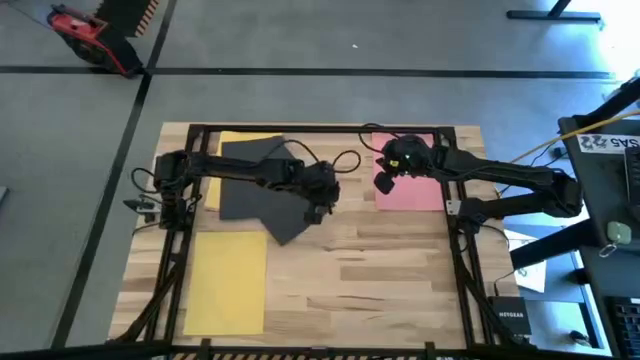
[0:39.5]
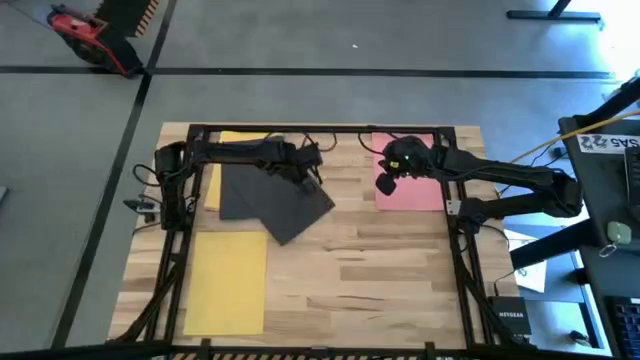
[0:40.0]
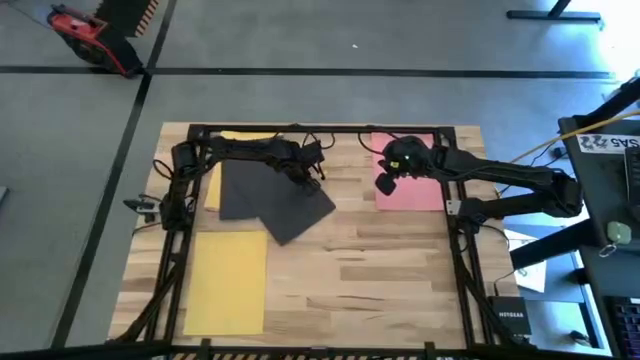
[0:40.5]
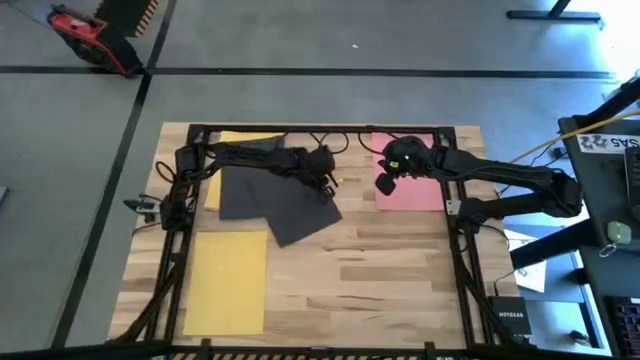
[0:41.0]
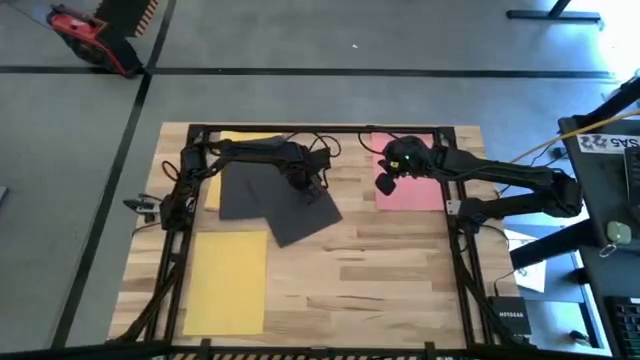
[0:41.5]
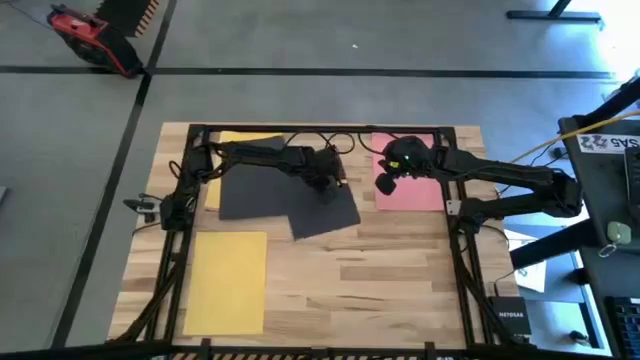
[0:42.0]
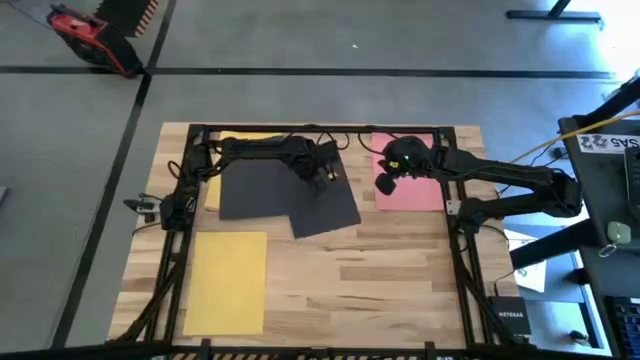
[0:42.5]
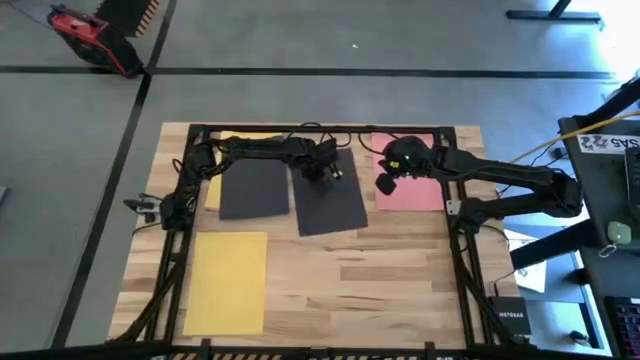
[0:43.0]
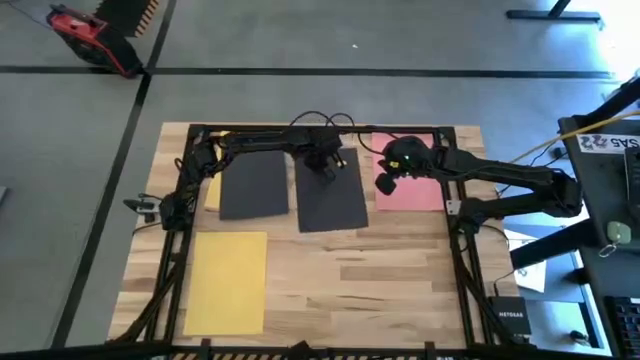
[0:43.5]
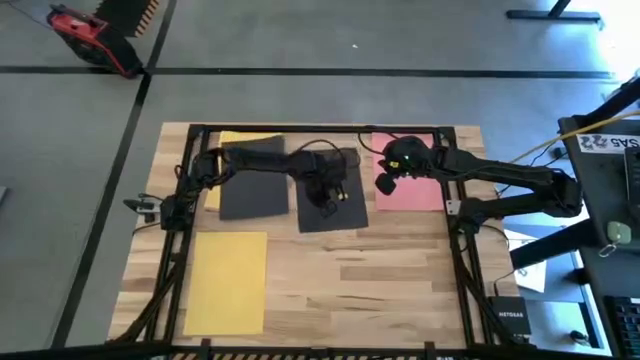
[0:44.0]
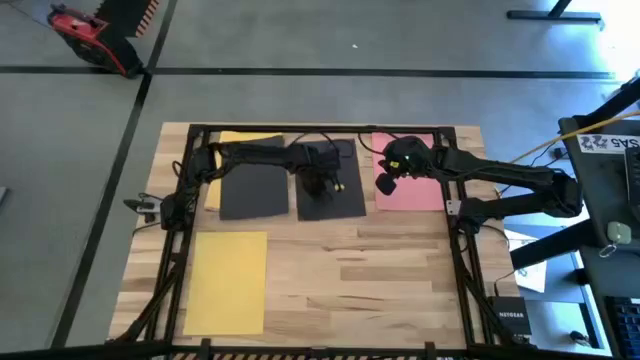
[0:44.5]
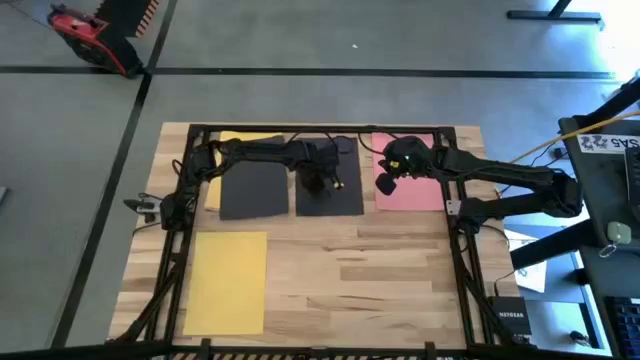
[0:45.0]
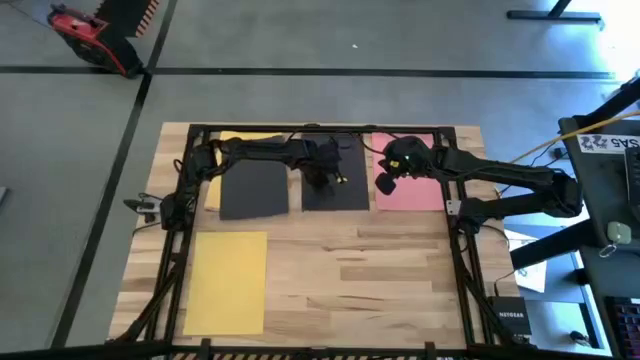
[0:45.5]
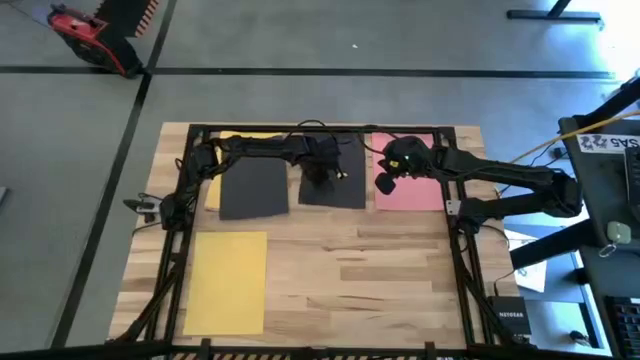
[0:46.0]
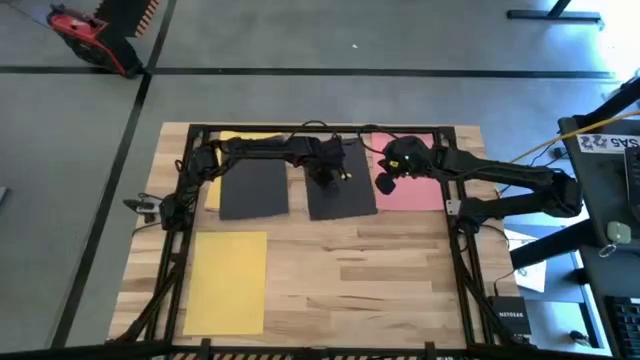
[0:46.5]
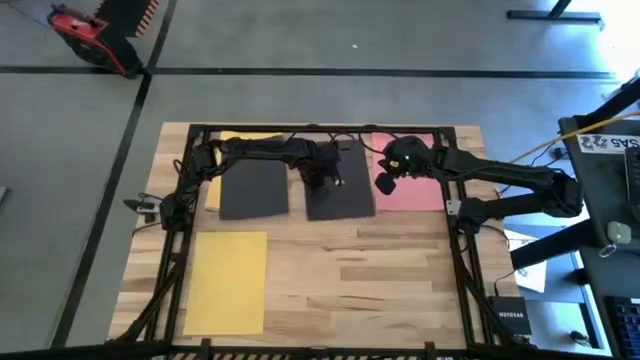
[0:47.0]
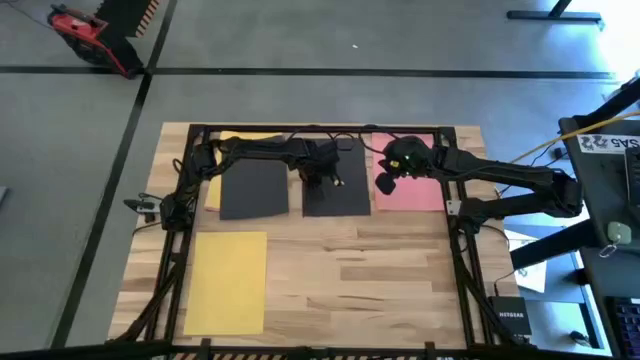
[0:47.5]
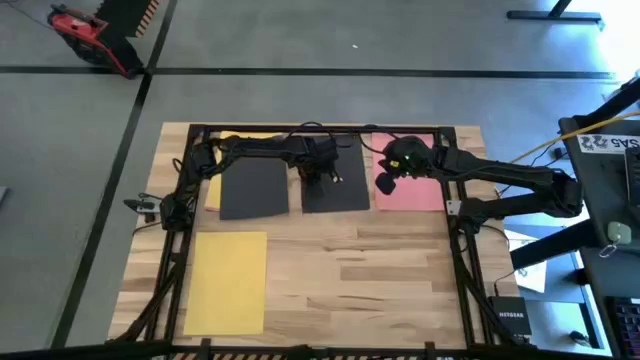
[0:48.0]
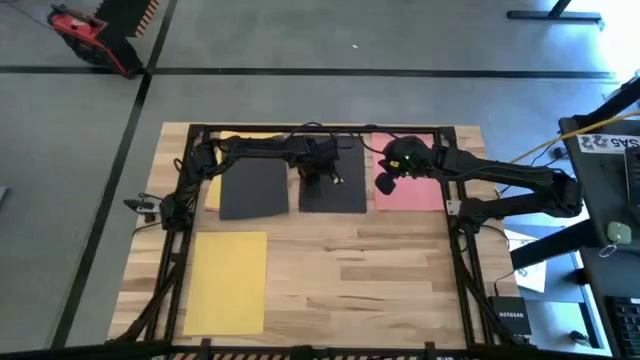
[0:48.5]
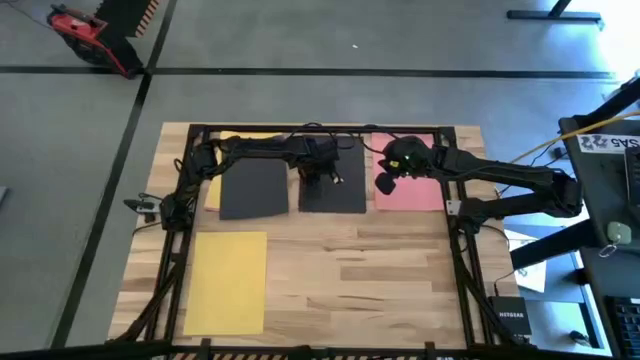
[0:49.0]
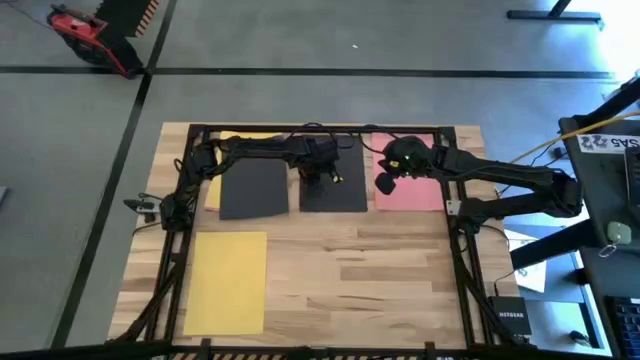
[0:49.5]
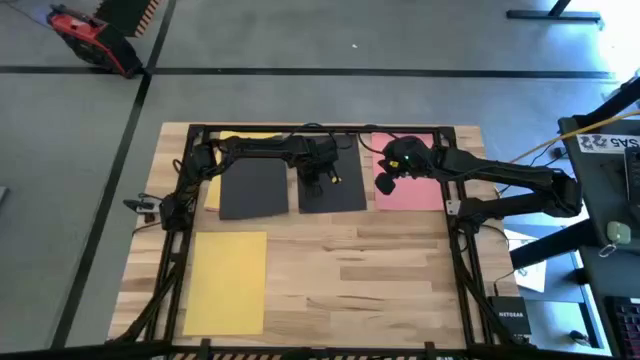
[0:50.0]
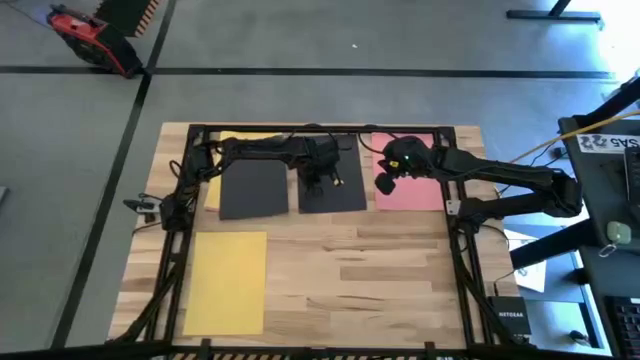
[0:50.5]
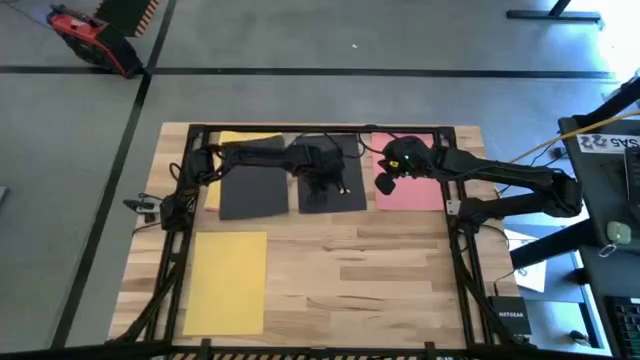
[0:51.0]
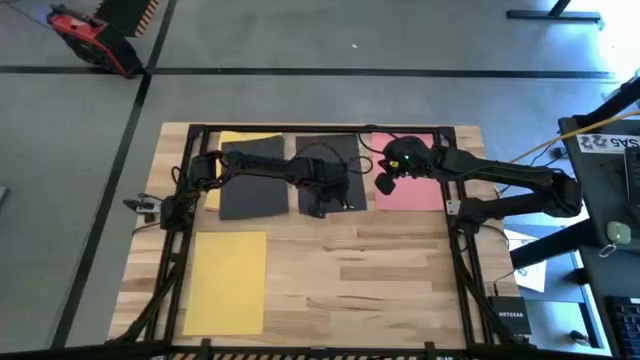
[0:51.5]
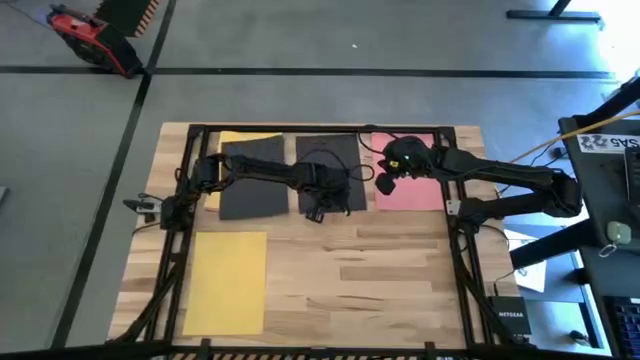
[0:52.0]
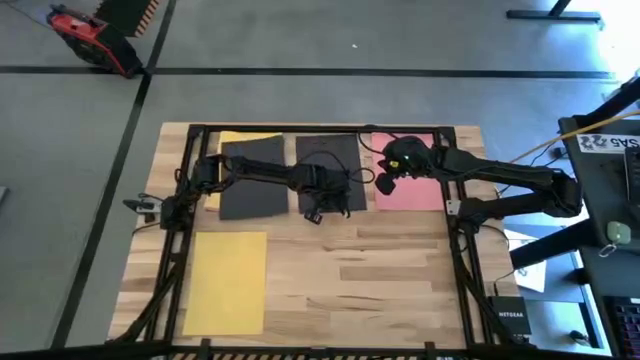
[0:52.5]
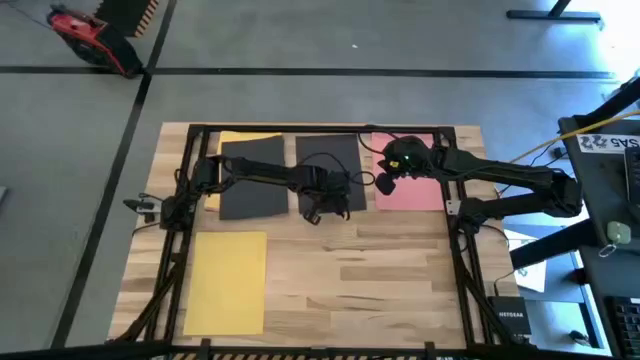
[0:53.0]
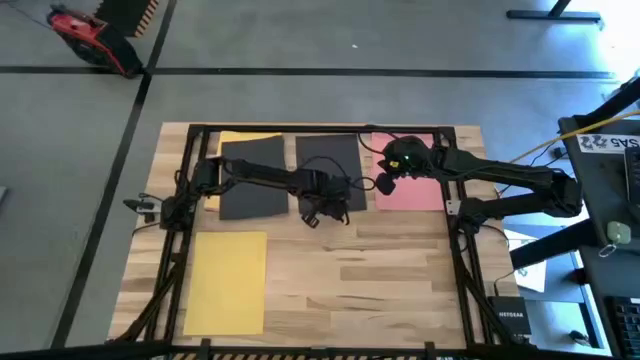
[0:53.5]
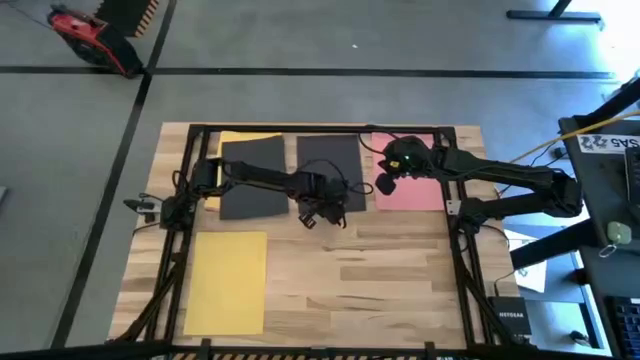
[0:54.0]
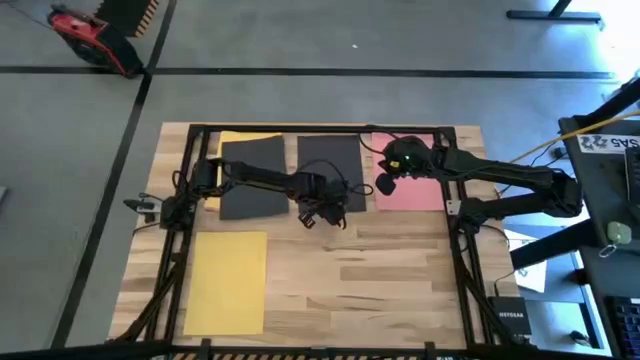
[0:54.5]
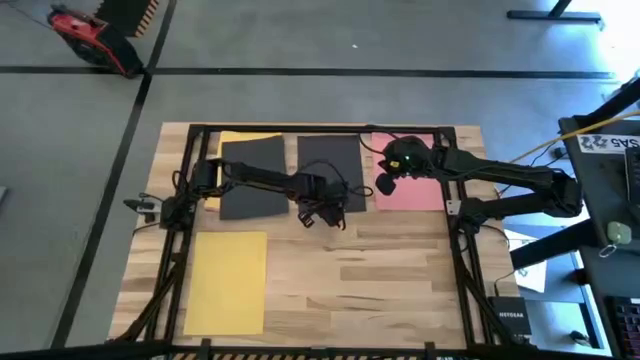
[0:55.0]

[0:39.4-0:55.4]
Task: Organize paper
Move the black paper to the top center of the table

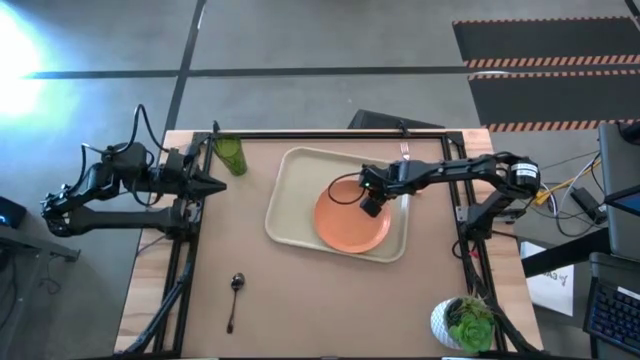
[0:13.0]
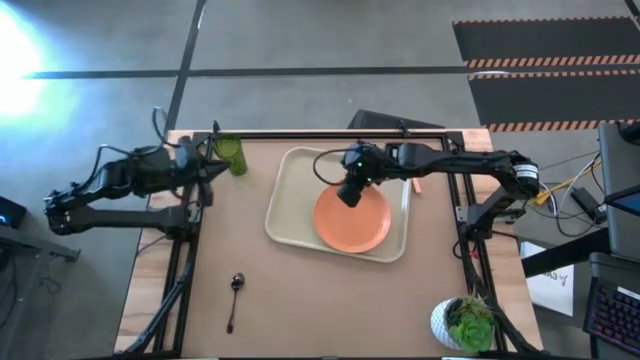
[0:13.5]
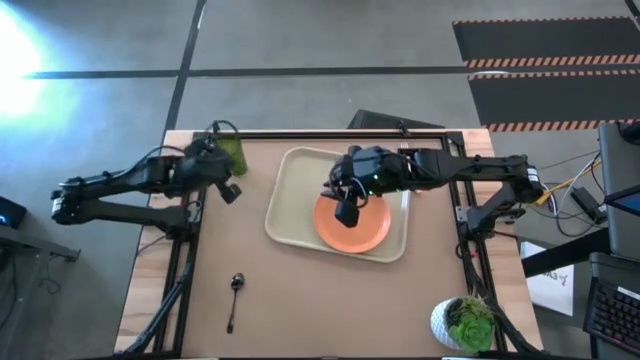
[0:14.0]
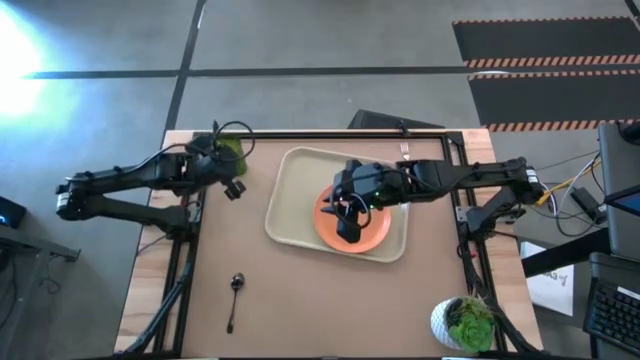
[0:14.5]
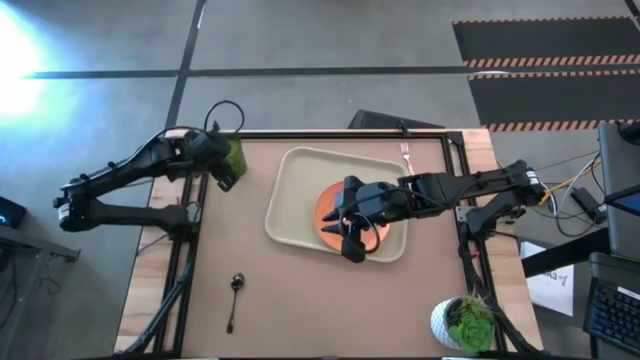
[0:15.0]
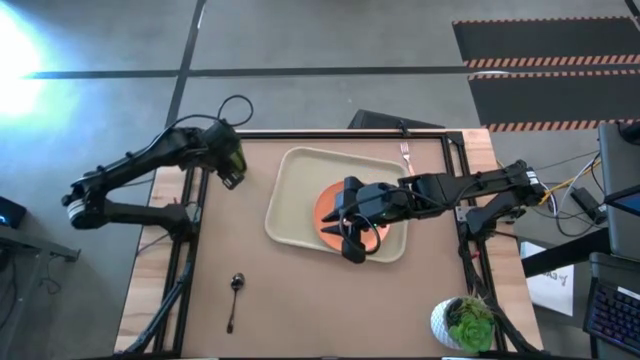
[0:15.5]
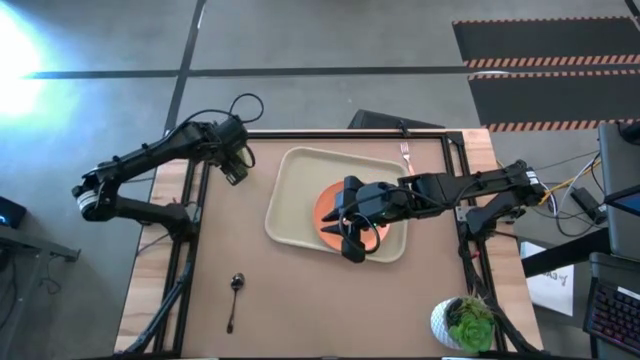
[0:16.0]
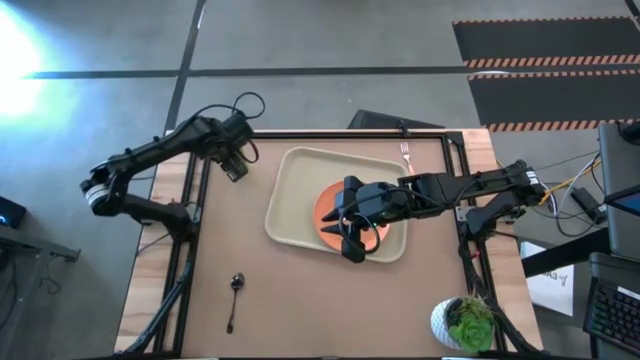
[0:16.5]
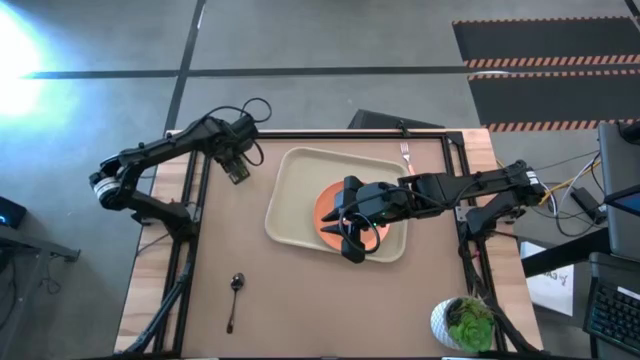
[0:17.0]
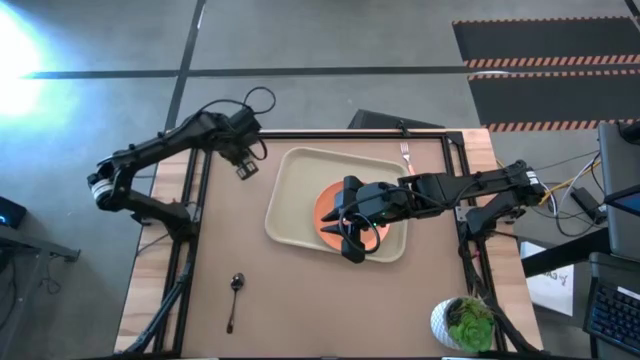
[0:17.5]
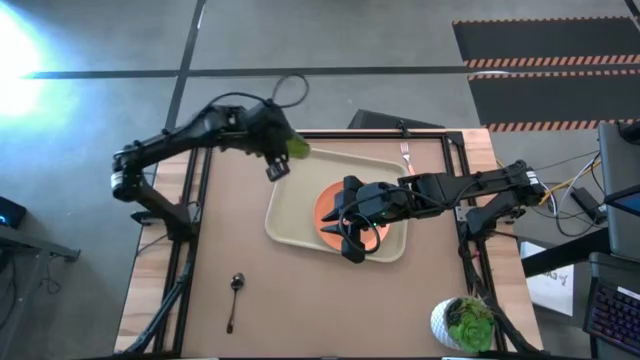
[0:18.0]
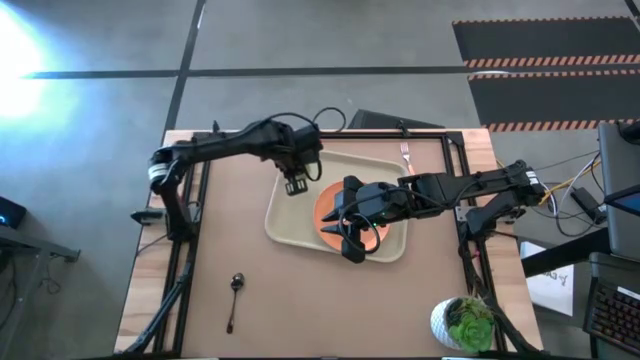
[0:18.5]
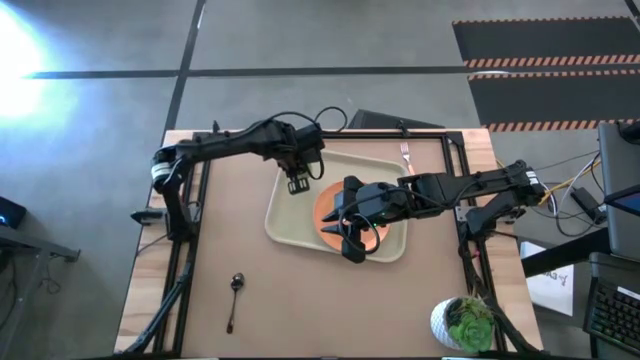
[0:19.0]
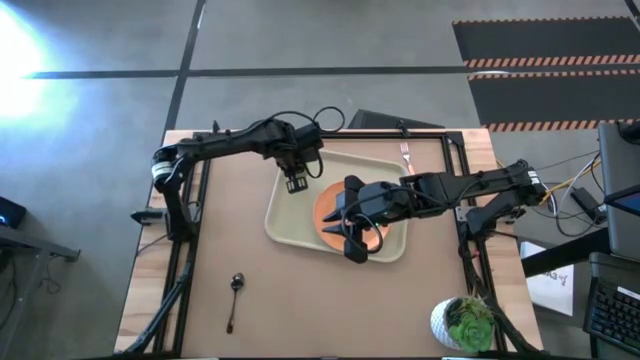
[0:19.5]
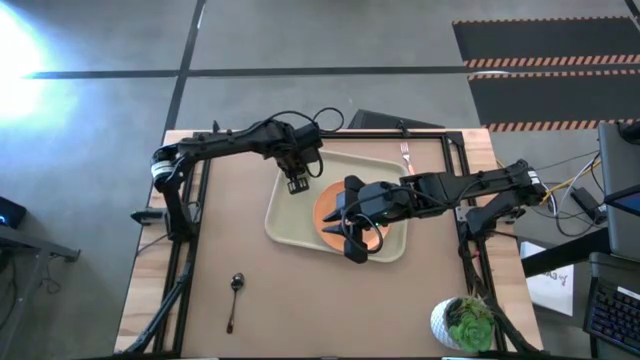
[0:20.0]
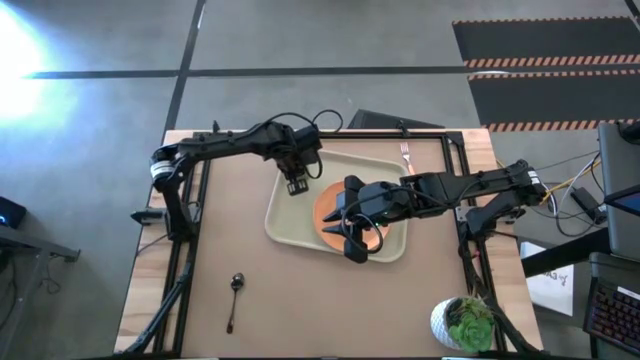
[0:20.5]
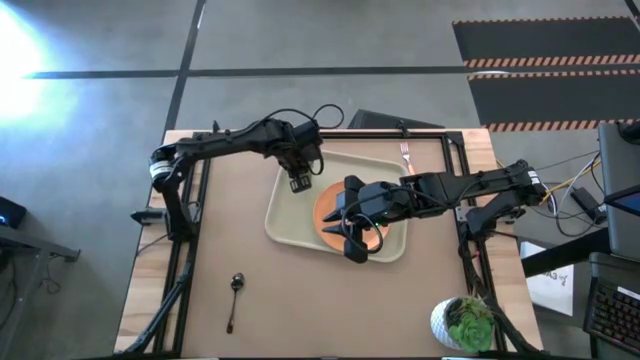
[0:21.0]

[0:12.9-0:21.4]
Task: Pick and place plate/cup/fork/spoon on tray
Put the green glass on the the light brown serving tray to the top right of the orange plate
